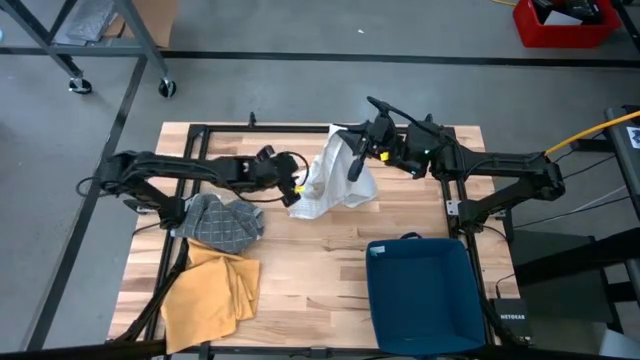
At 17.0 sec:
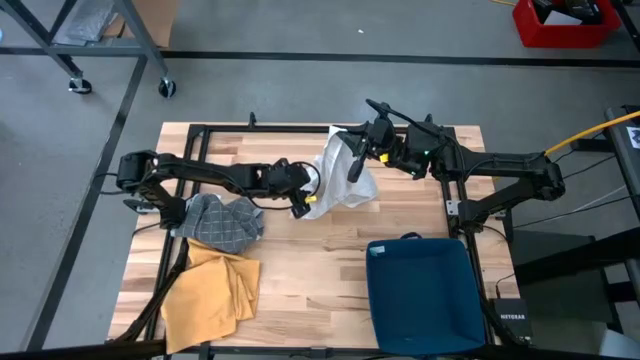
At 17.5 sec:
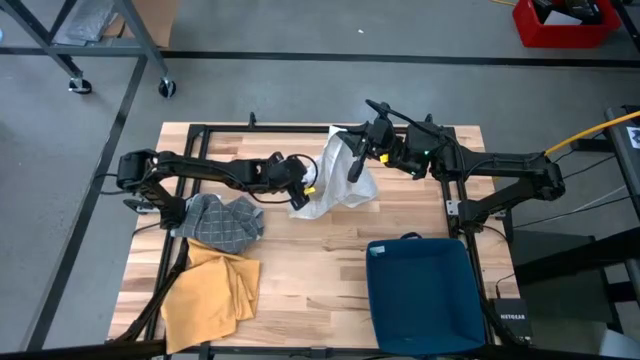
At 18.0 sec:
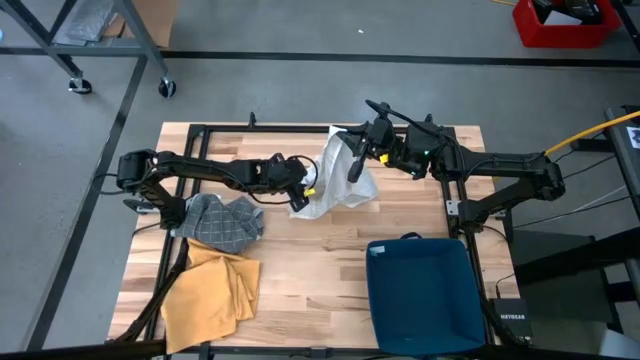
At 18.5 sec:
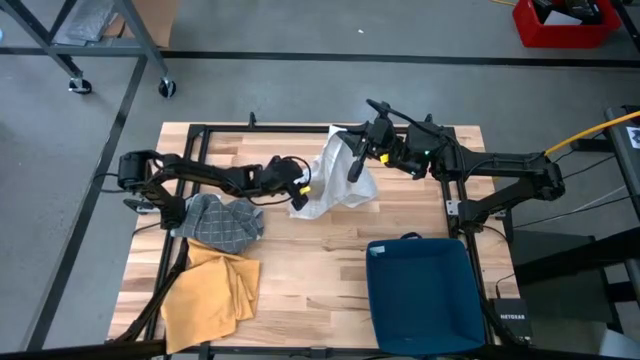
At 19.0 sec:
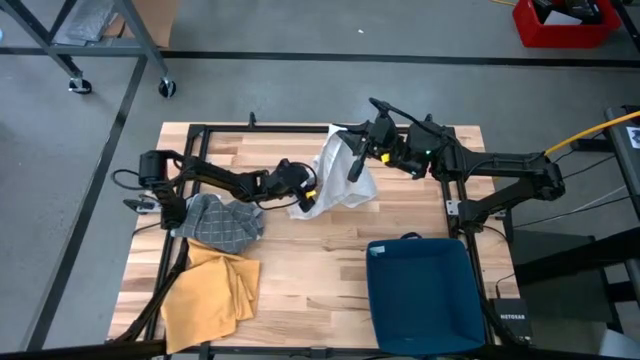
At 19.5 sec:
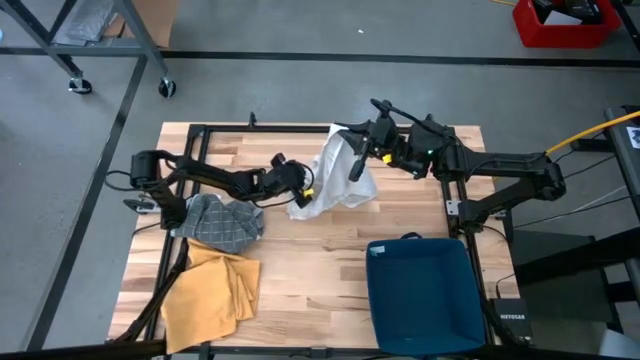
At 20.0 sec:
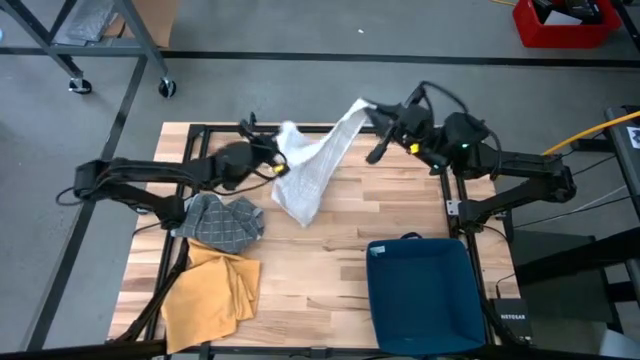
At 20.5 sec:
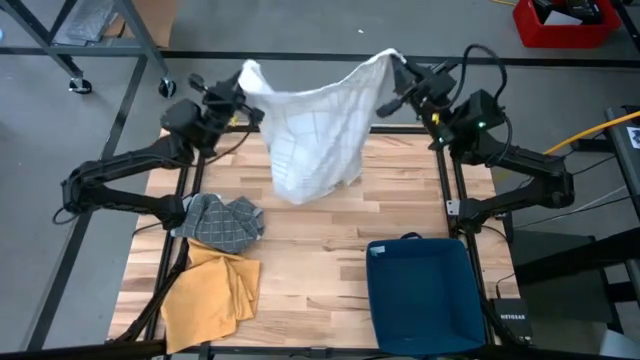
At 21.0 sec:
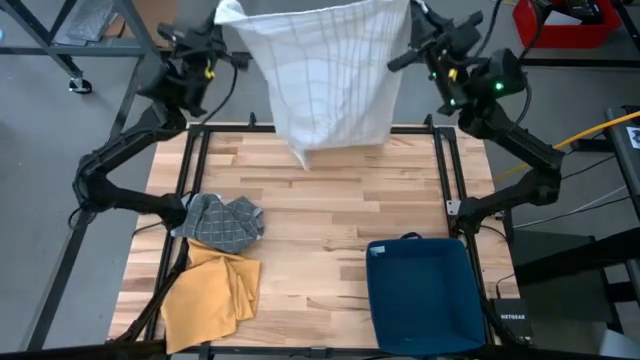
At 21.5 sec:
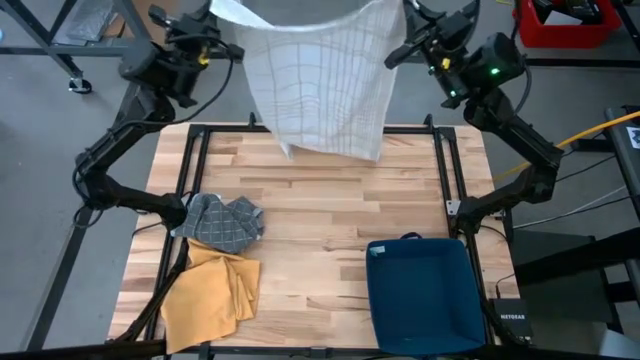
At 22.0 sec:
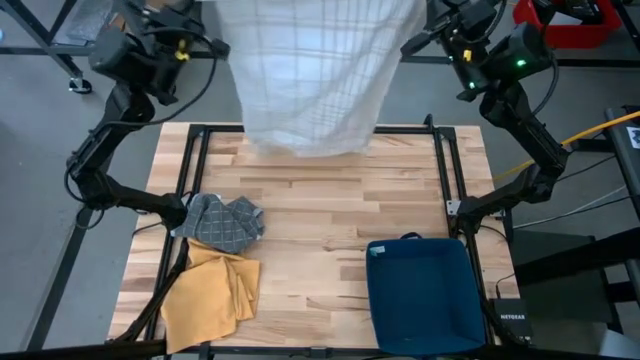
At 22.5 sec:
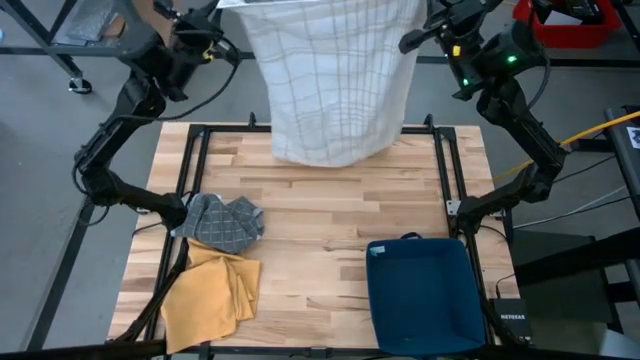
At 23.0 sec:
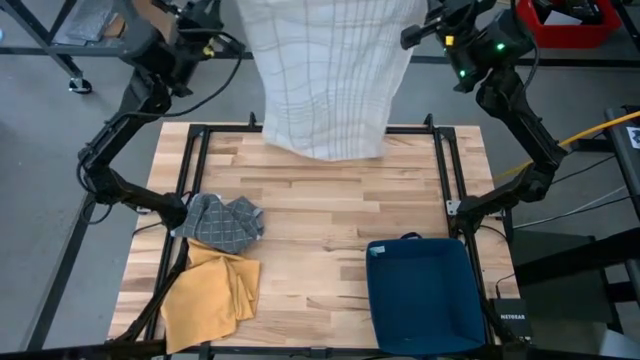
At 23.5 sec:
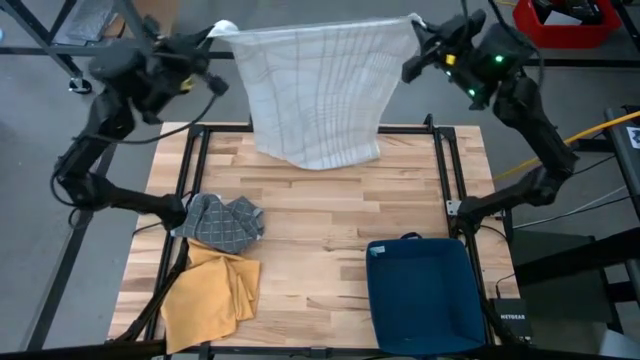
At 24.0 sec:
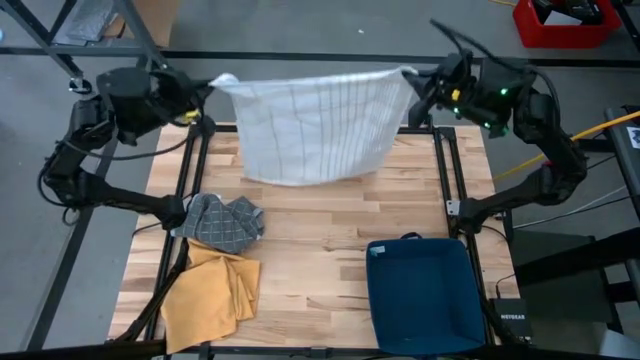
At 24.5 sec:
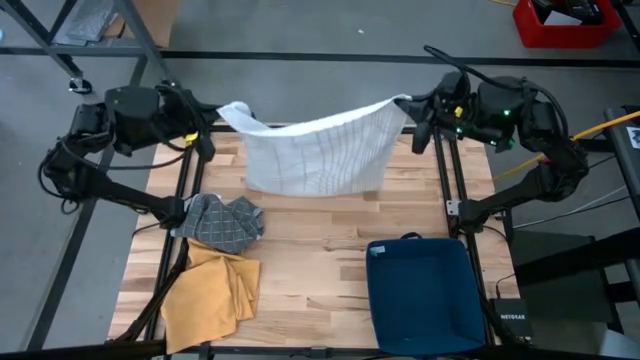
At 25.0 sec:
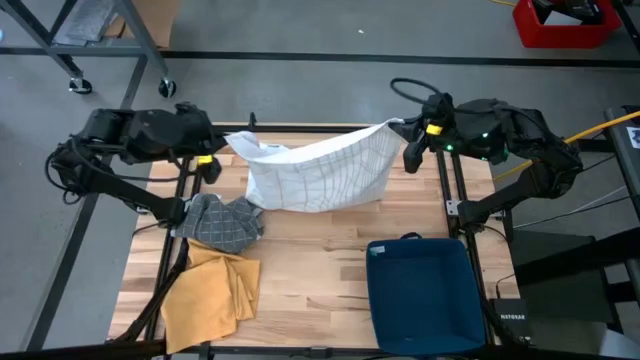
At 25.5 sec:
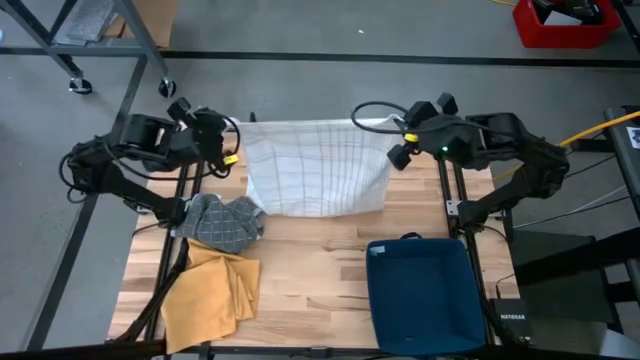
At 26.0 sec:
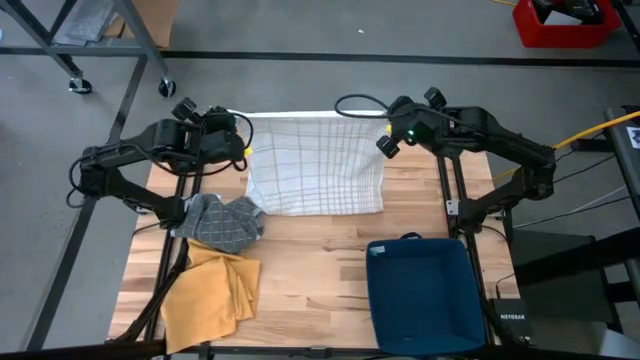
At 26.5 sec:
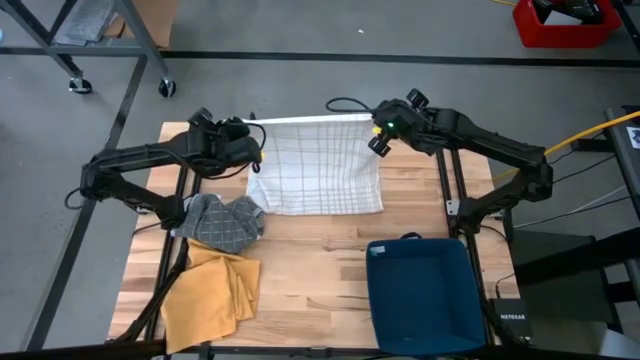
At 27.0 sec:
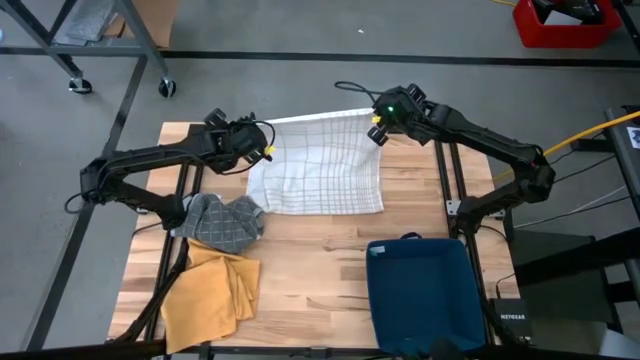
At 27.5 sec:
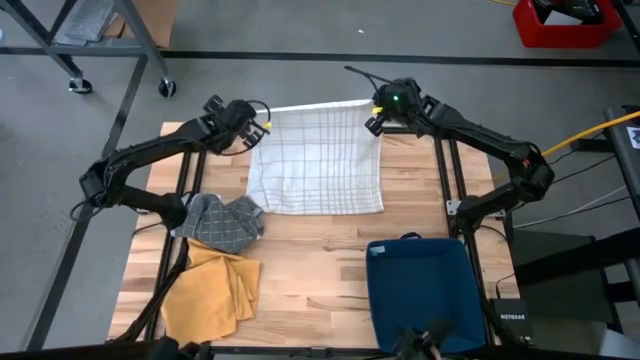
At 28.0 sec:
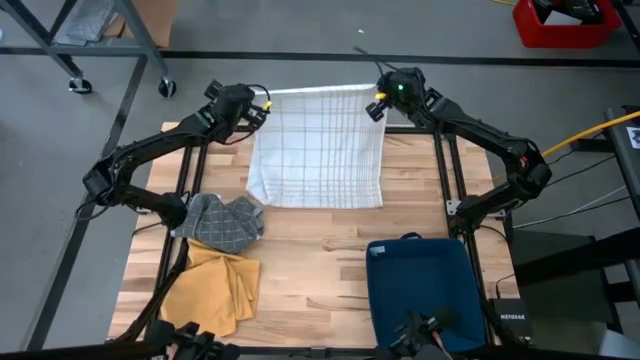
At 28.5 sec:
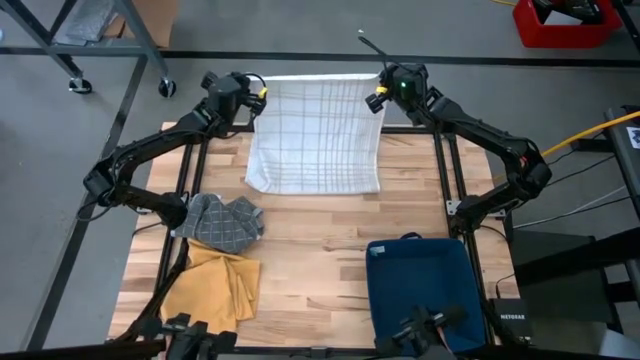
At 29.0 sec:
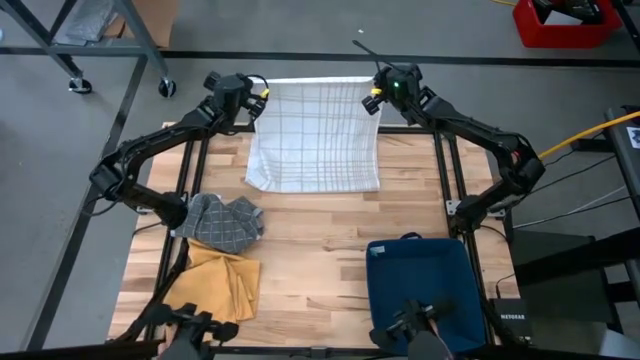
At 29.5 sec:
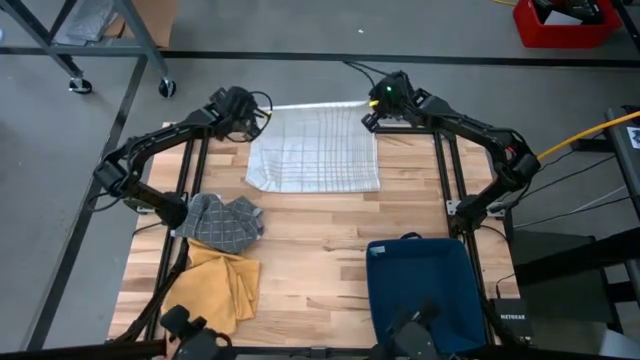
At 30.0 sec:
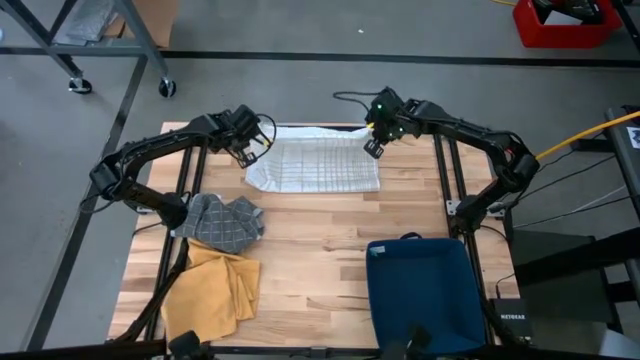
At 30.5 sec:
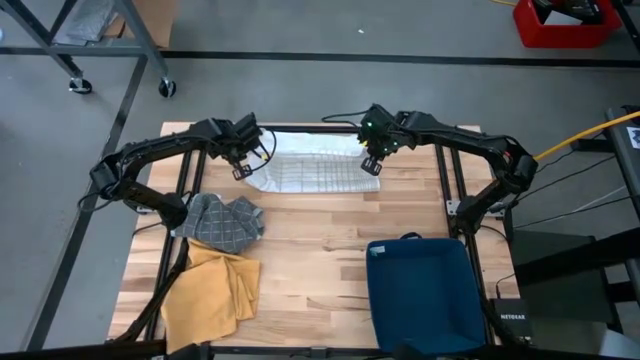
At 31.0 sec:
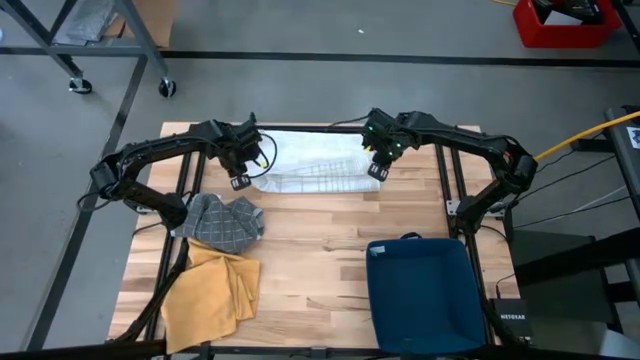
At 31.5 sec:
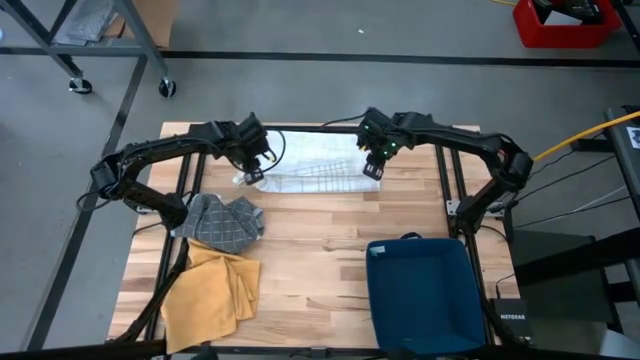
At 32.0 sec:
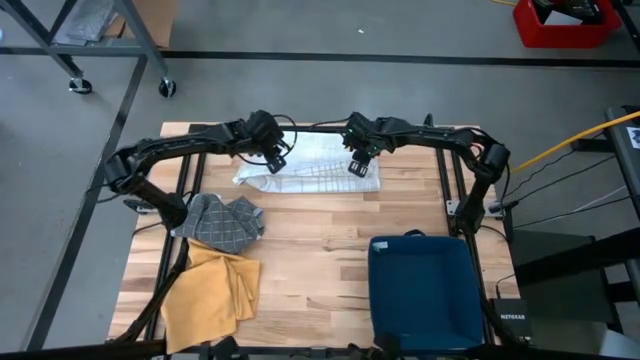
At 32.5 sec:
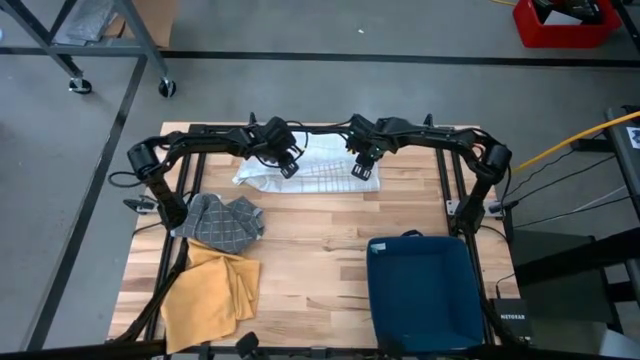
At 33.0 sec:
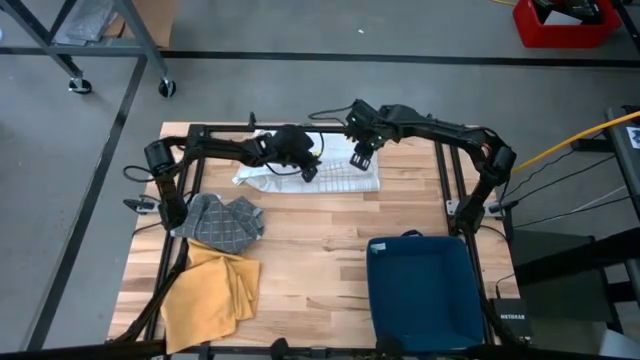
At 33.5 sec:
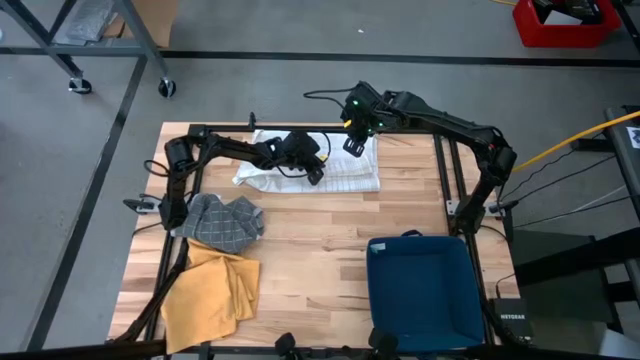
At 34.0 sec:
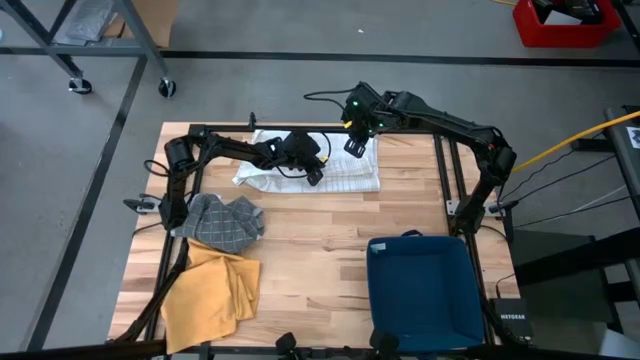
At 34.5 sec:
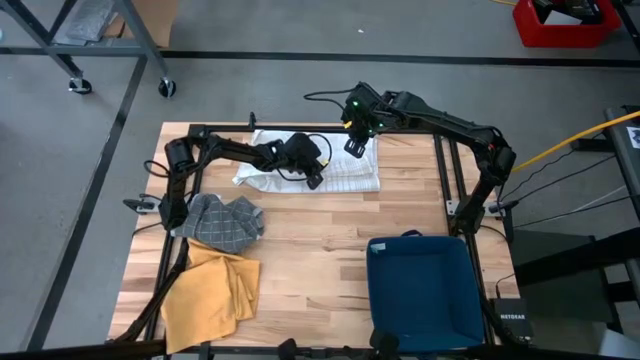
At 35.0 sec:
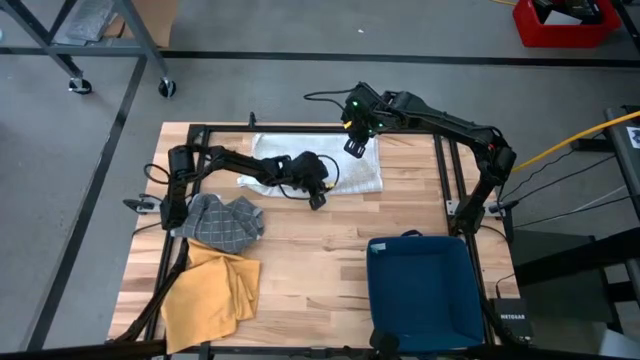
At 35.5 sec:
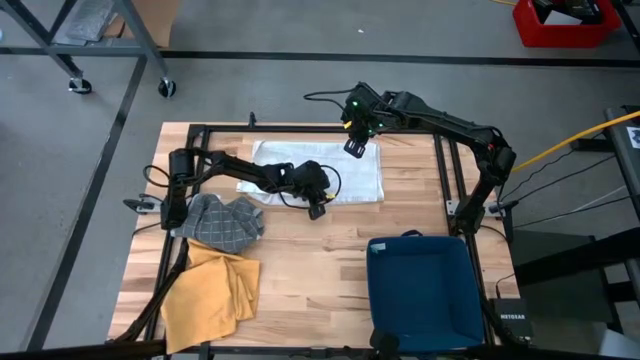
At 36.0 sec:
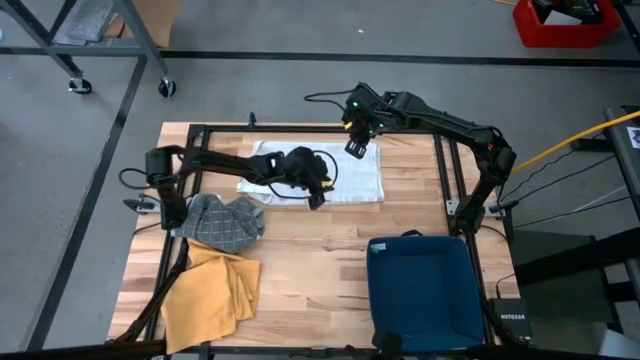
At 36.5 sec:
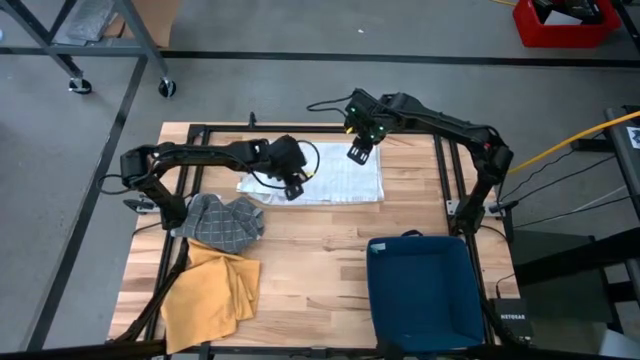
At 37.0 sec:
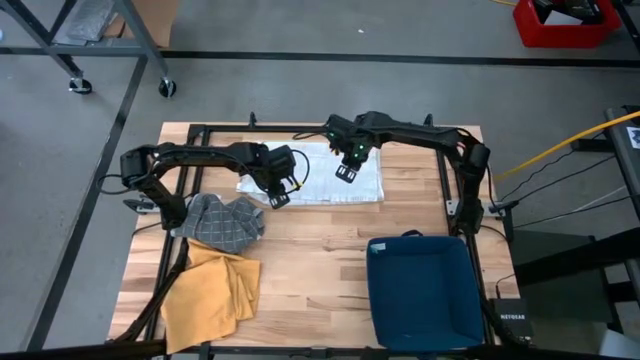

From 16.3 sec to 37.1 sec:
Task: Fold towel
Fold the white towel
